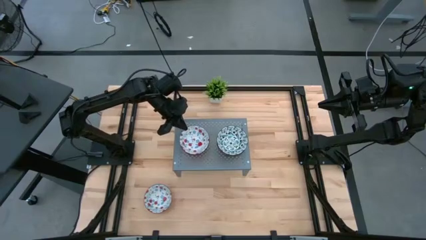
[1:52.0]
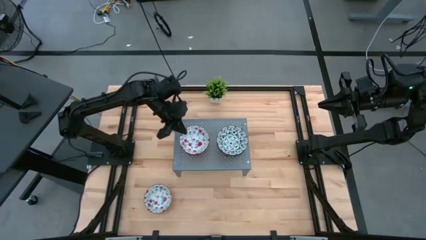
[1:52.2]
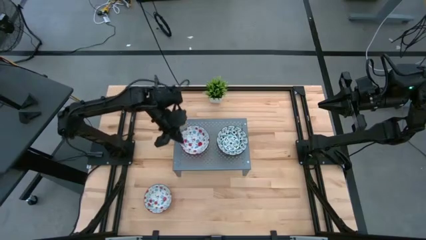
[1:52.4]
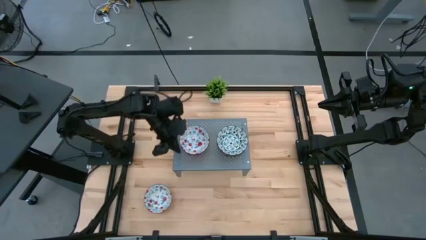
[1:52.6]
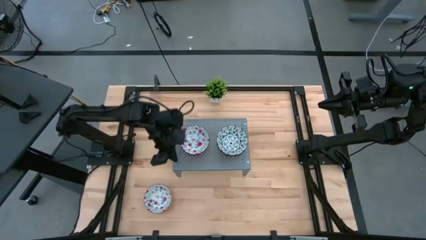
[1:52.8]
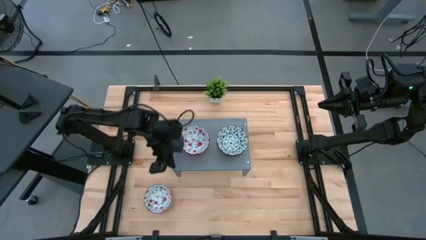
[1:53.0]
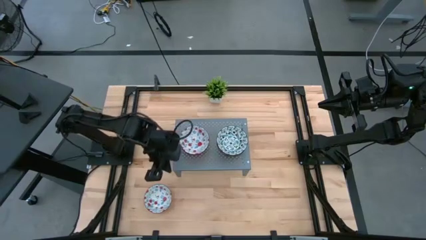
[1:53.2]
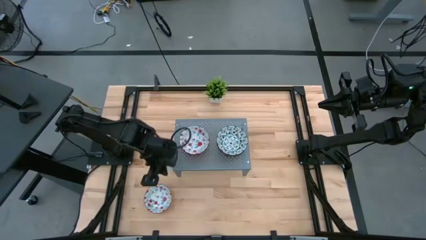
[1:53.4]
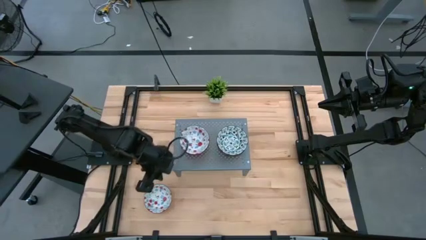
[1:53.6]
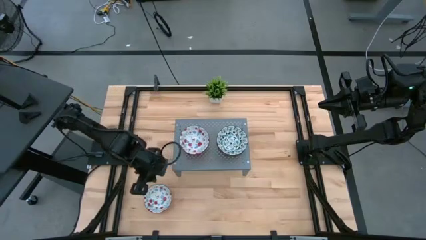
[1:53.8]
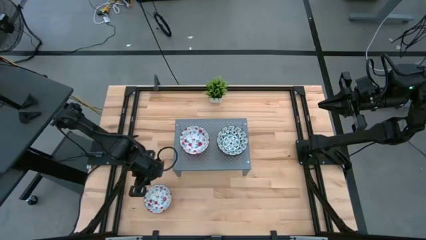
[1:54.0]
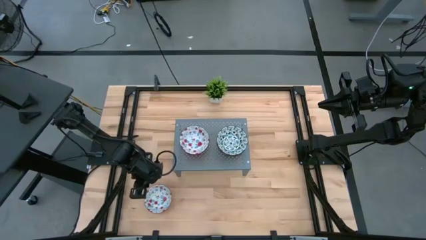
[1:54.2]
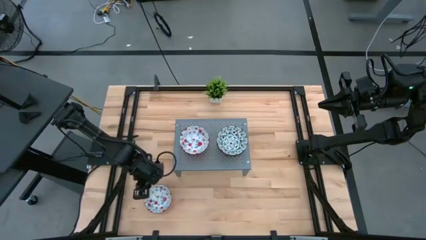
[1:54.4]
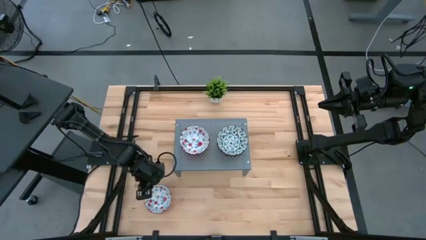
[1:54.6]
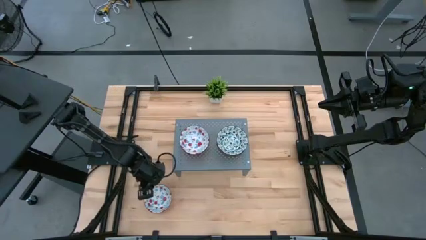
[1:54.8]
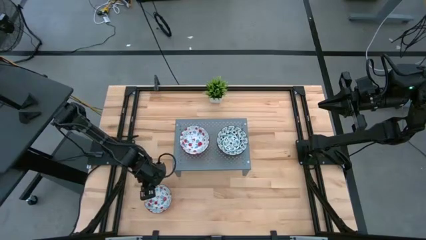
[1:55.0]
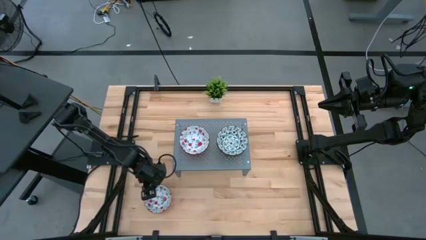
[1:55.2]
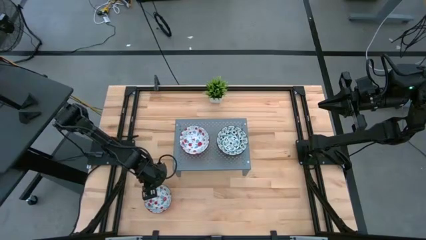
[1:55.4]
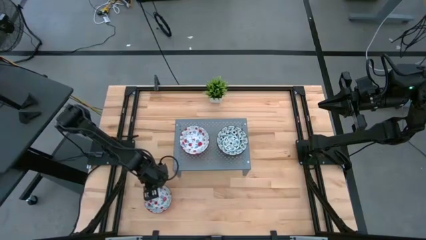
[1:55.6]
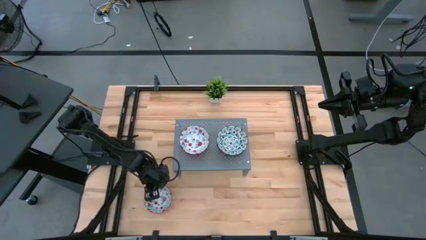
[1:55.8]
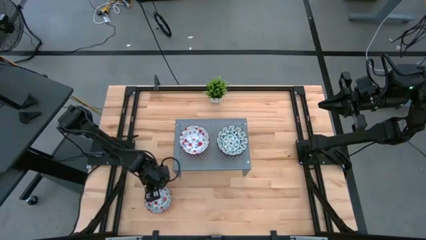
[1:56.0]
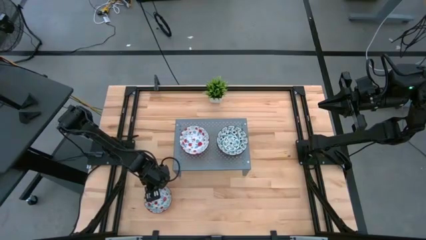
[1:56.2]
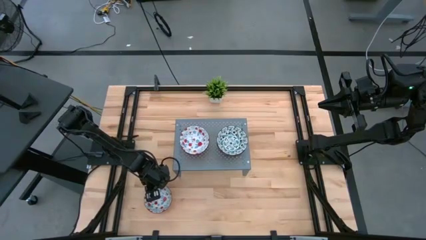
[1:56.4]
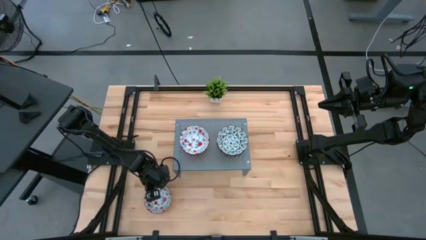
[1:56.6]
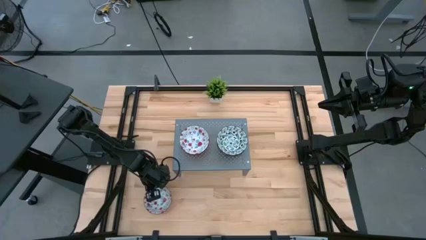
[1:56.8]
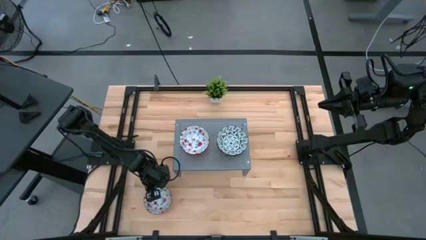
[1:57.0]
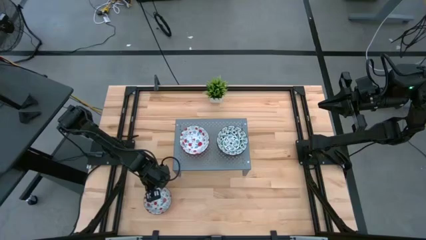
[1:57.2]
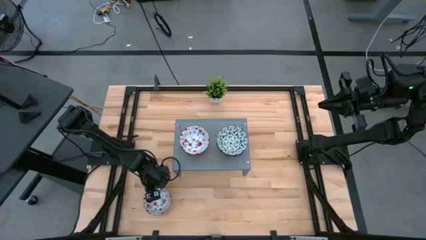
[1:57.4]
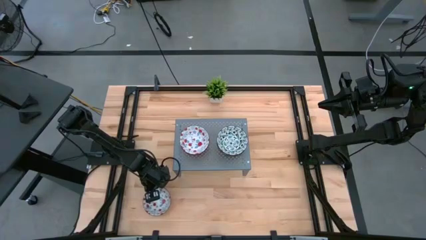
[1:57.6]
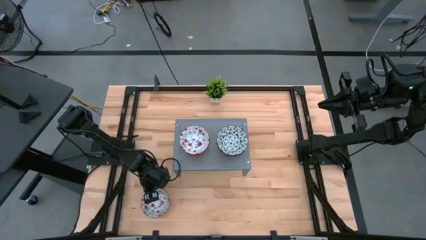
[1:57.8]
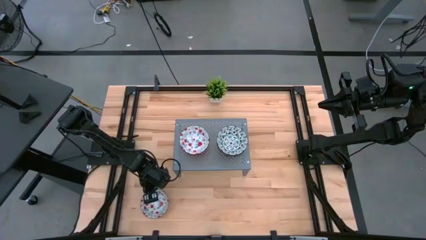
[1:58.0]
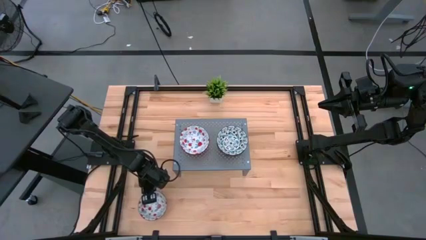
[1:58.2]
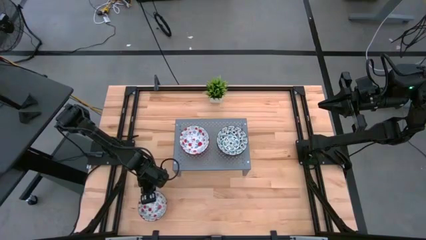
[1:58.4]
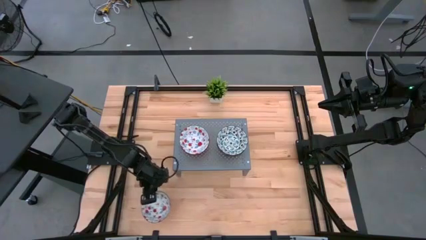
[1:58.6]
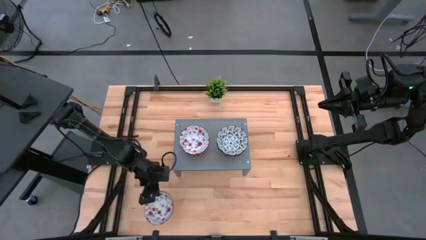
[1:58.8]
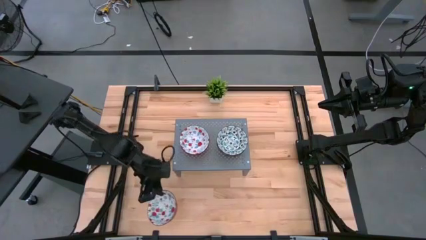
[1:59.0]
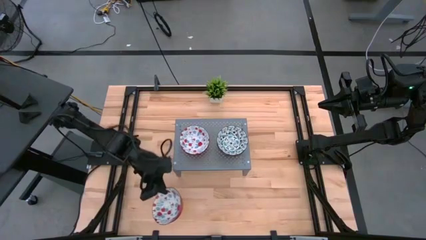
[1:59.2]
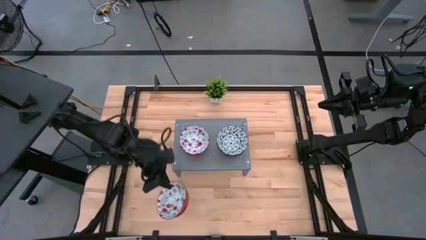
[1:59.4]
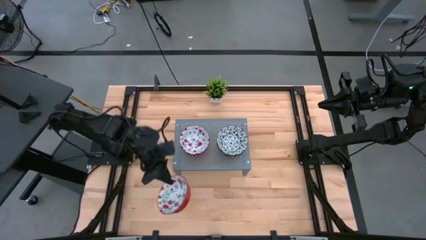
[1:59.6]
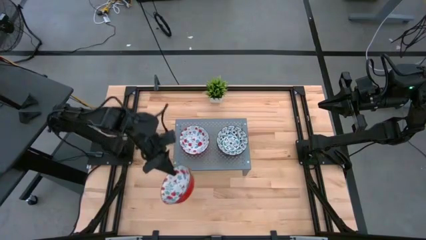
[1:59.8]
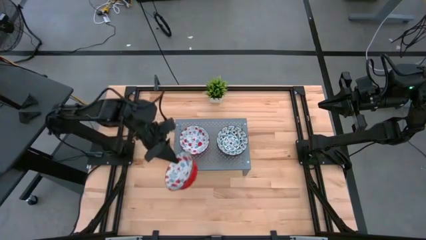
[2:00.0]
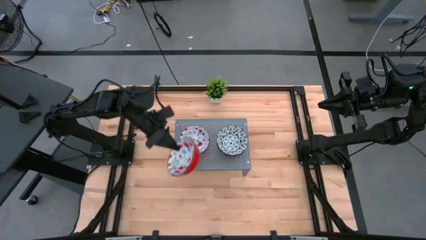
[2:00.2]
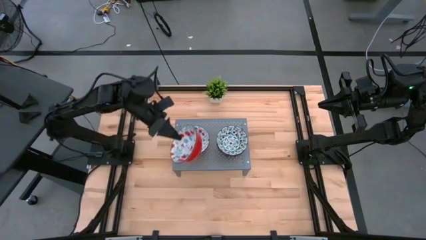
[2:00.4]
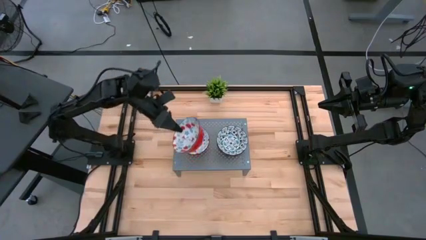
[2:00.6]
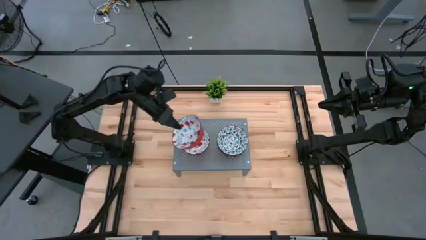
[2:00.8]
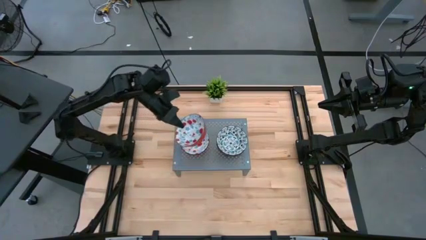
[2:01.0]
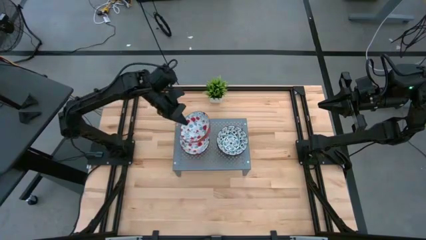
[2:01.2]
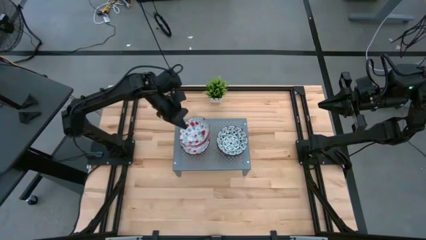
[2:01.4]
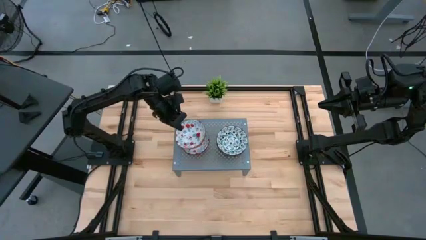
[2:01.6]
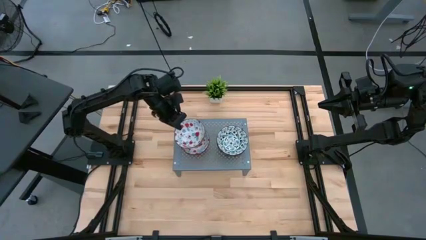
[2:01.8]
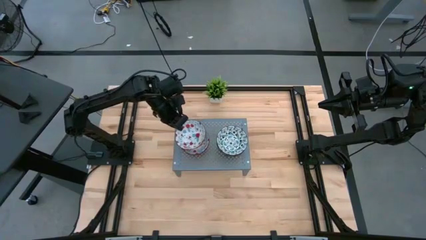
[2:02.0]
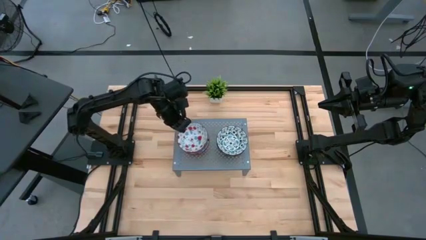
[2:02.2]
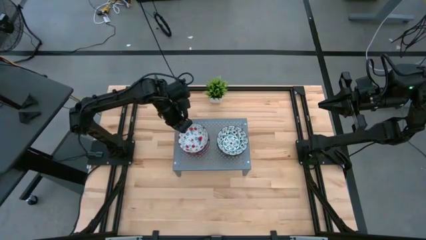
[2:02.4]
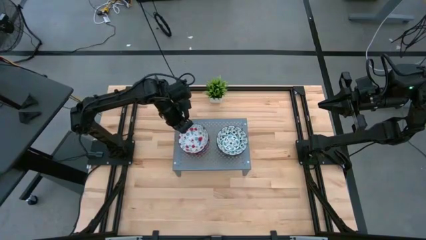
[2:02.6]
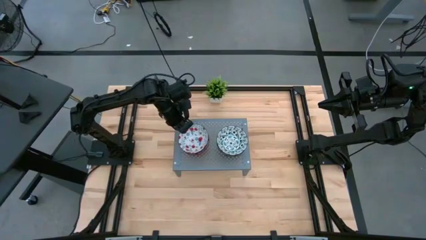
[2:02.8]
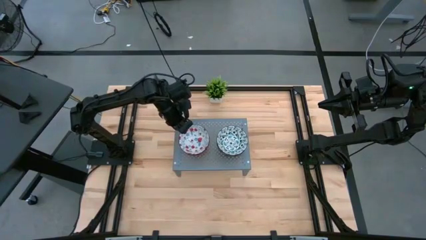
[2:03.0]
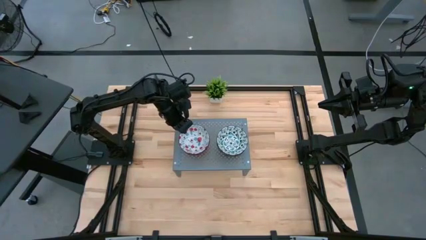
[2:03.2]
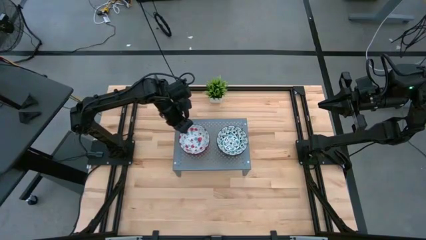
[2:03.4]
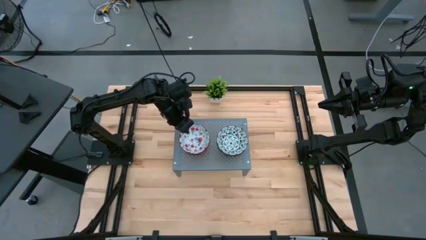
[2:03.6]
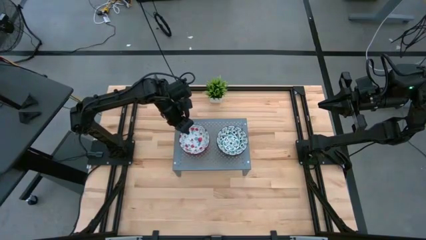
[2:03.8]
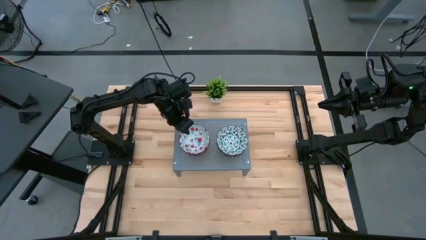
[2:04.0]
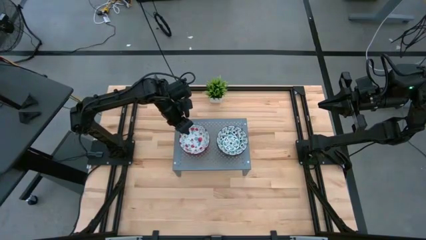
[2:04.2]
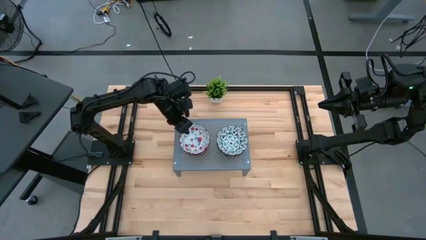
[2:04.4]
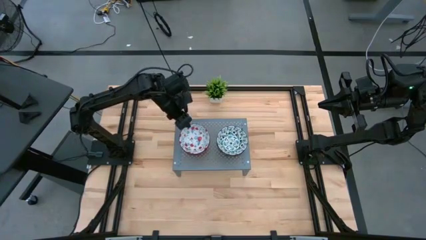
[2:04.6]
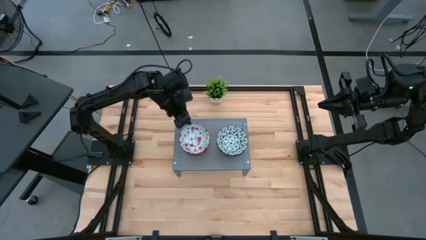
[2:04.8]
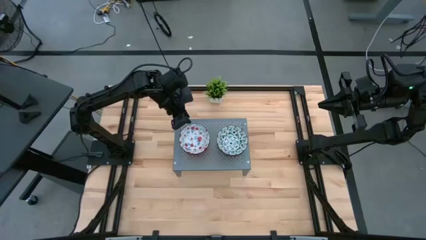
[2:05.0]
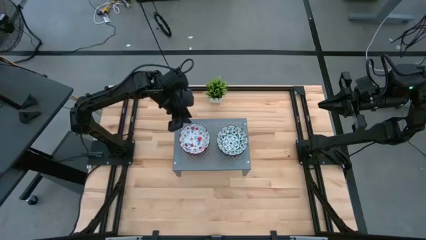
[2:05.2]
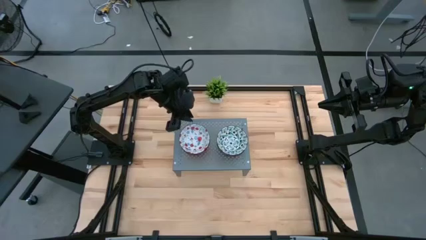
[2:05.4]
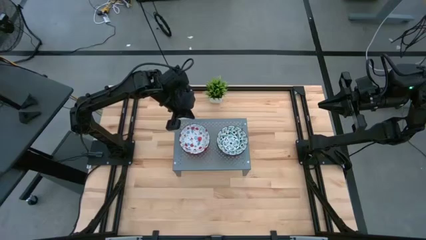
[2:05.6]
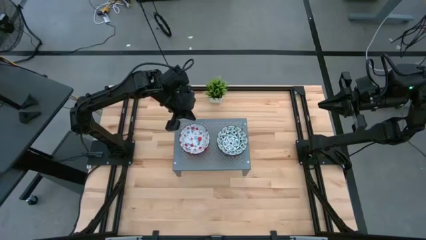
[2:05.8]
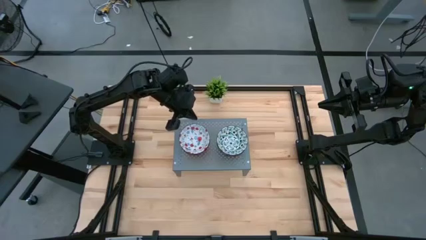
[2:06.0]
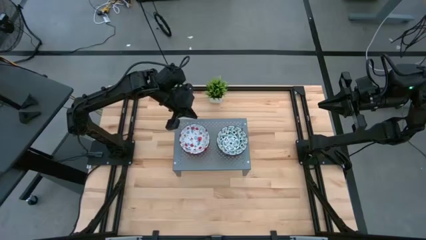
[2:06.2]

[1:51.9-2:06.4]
Task: Pick & Place Mini bowls
Stack the red patterned bowl on the other red patterned bowls on the shelf
